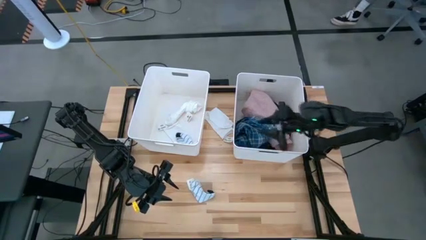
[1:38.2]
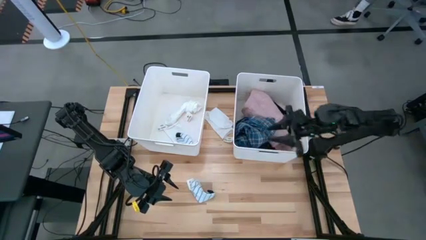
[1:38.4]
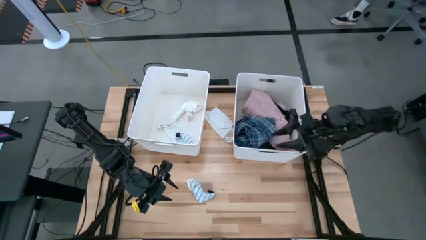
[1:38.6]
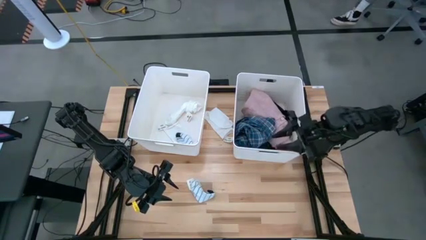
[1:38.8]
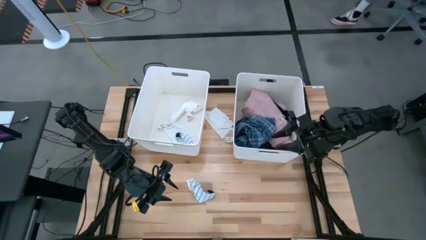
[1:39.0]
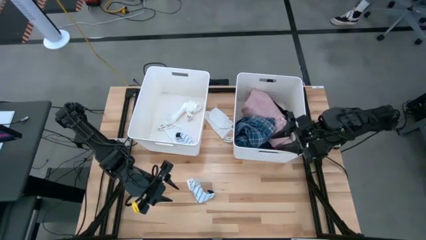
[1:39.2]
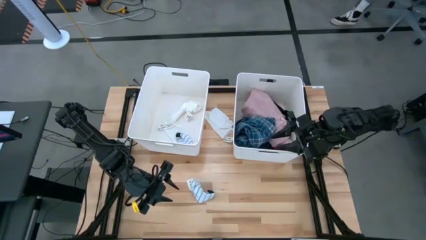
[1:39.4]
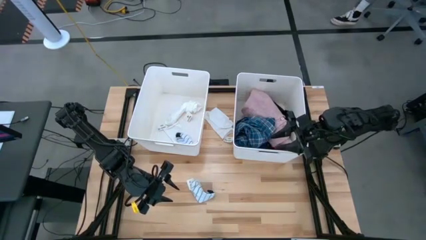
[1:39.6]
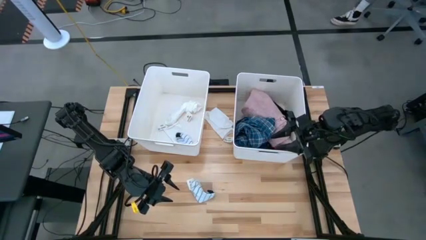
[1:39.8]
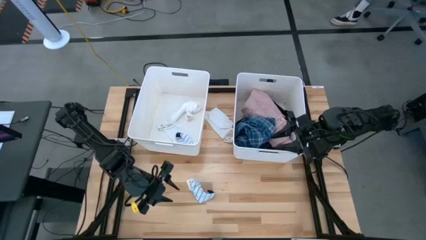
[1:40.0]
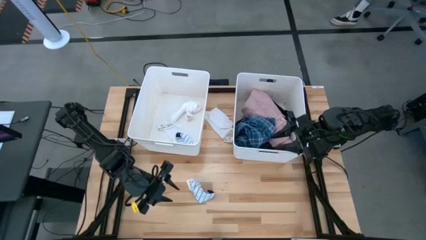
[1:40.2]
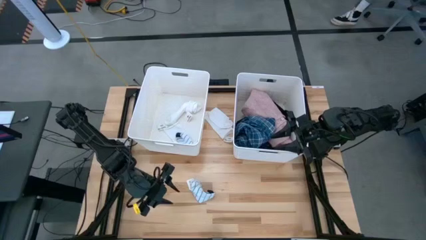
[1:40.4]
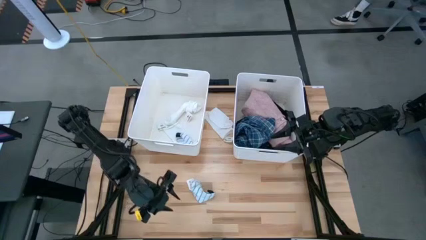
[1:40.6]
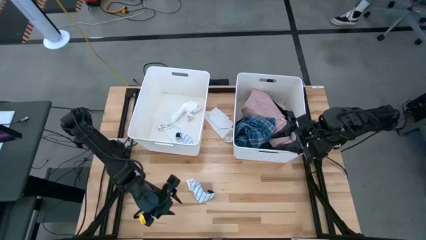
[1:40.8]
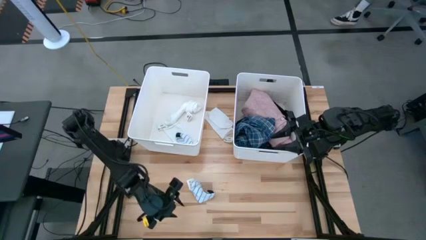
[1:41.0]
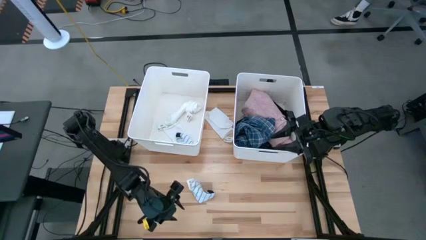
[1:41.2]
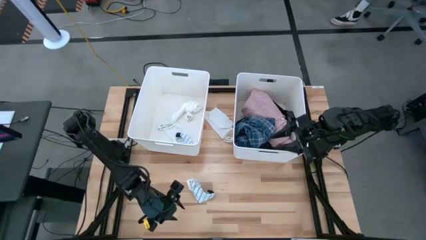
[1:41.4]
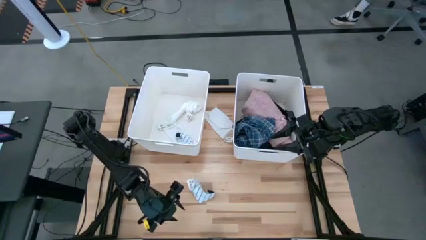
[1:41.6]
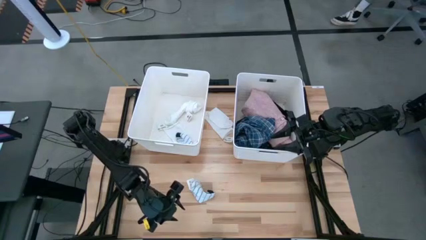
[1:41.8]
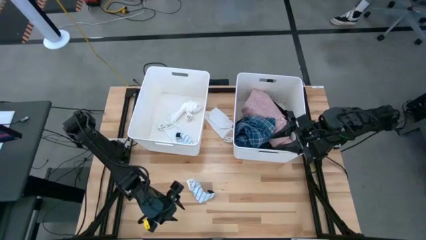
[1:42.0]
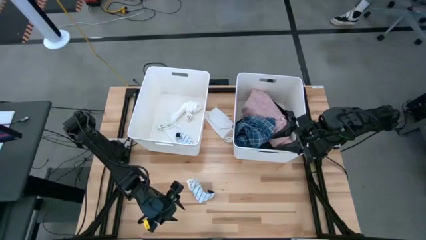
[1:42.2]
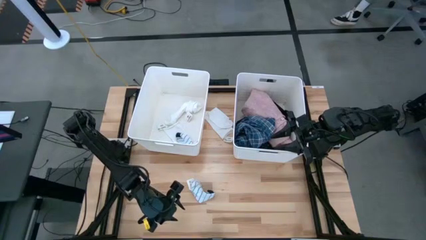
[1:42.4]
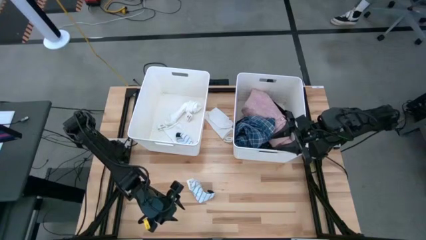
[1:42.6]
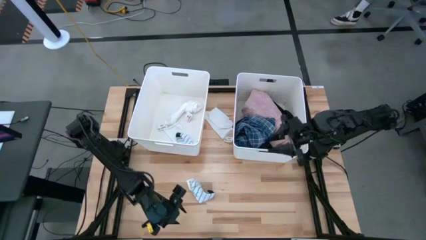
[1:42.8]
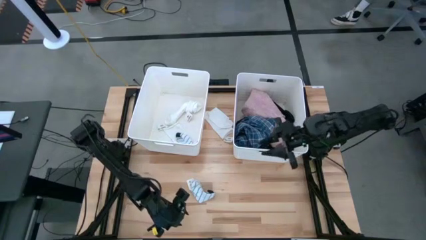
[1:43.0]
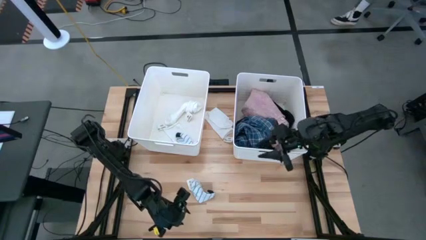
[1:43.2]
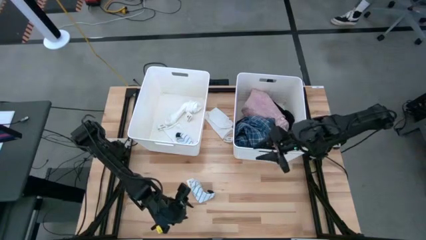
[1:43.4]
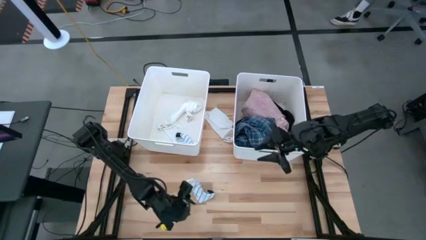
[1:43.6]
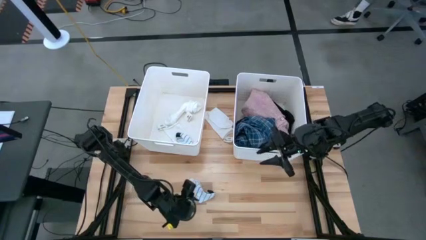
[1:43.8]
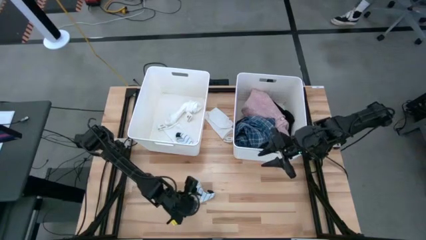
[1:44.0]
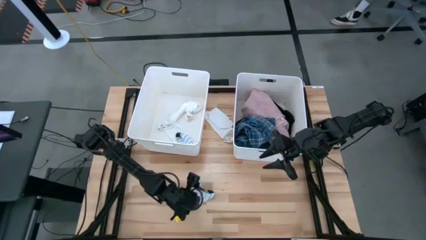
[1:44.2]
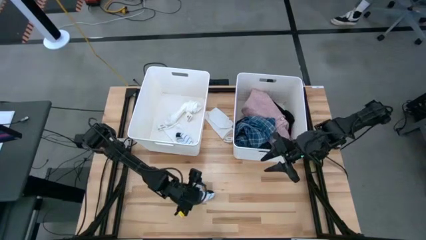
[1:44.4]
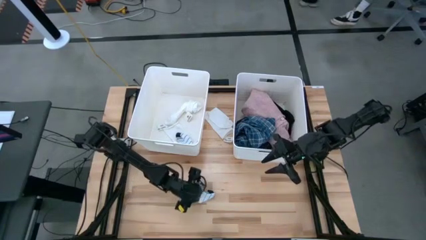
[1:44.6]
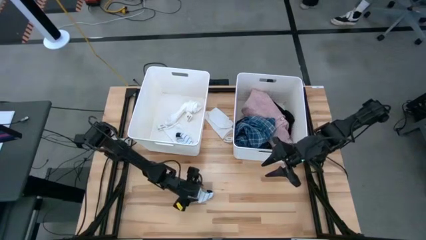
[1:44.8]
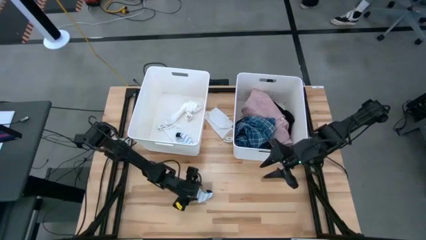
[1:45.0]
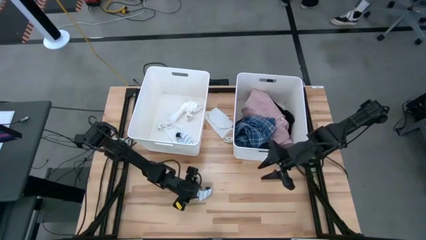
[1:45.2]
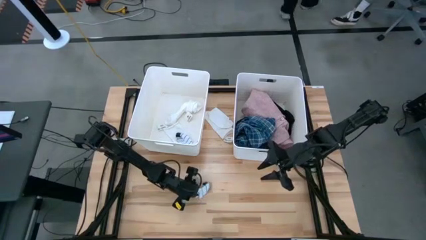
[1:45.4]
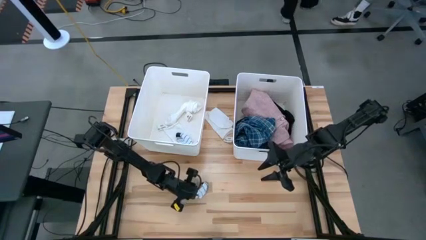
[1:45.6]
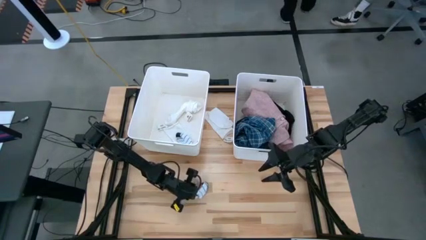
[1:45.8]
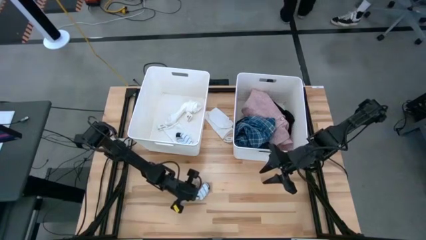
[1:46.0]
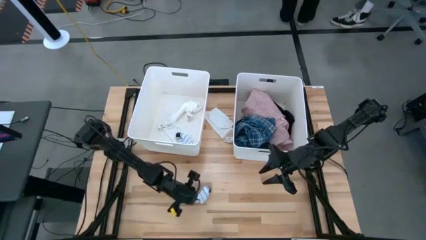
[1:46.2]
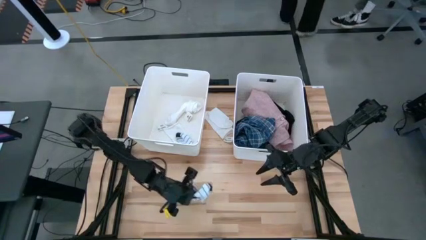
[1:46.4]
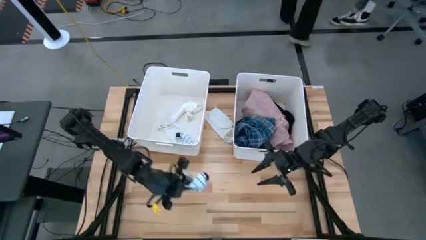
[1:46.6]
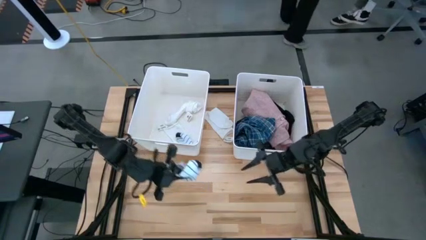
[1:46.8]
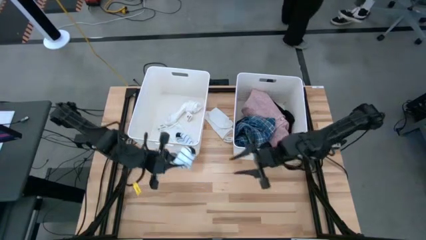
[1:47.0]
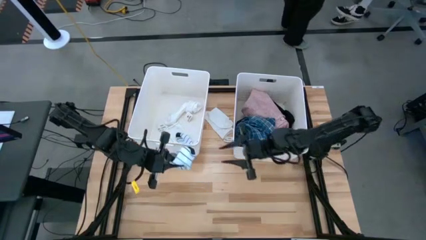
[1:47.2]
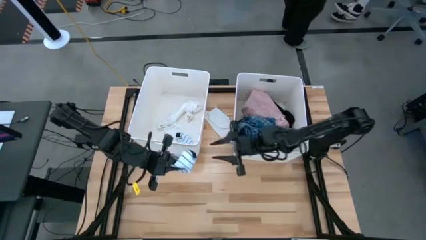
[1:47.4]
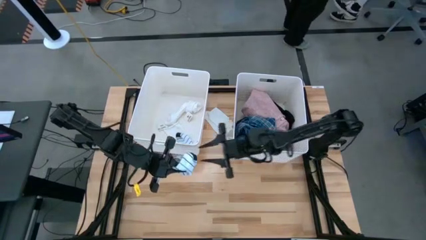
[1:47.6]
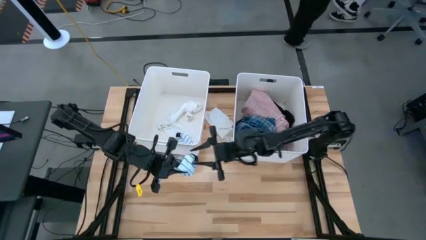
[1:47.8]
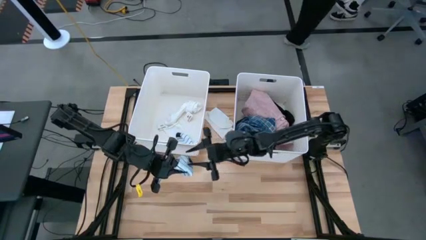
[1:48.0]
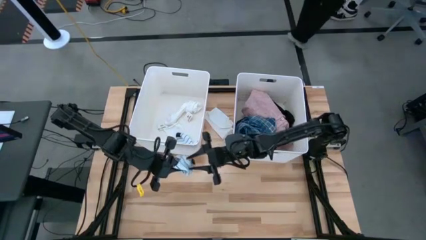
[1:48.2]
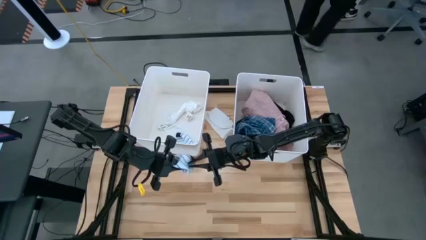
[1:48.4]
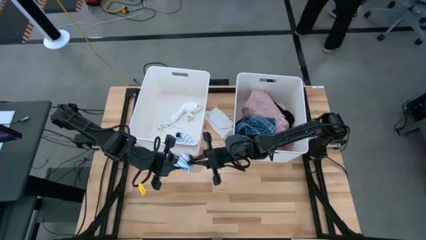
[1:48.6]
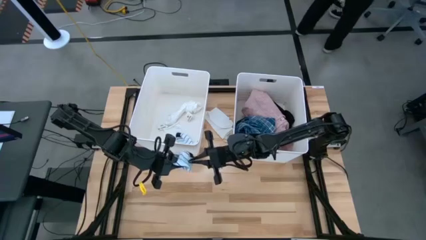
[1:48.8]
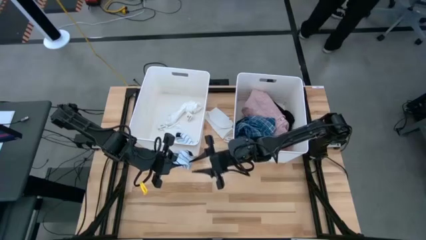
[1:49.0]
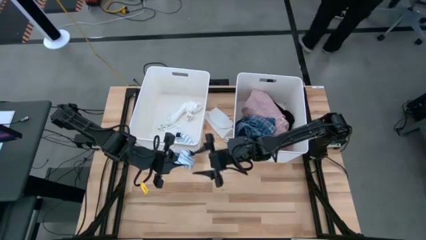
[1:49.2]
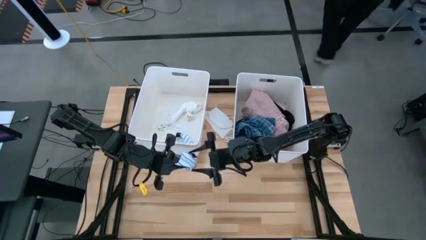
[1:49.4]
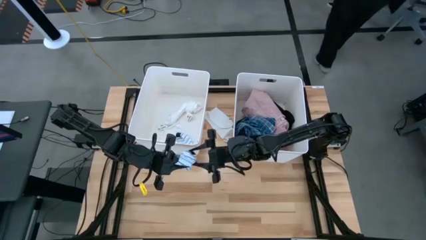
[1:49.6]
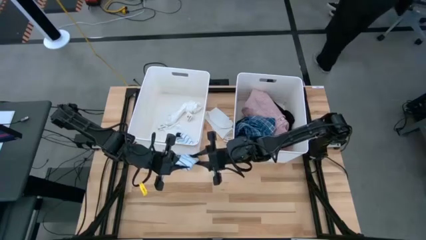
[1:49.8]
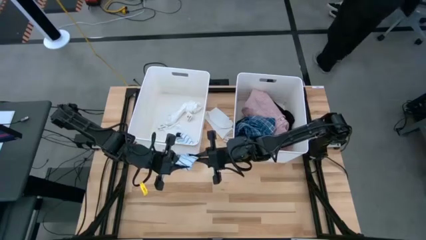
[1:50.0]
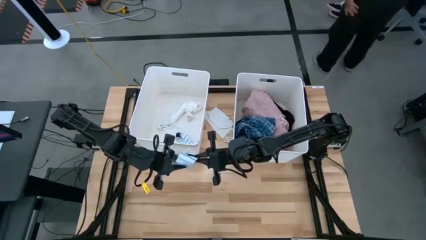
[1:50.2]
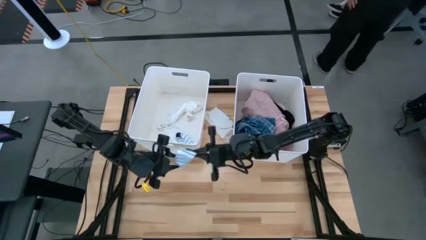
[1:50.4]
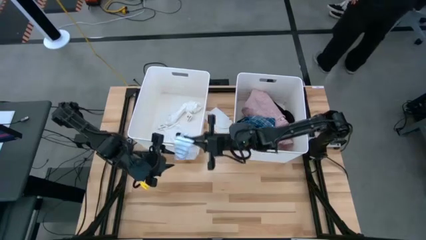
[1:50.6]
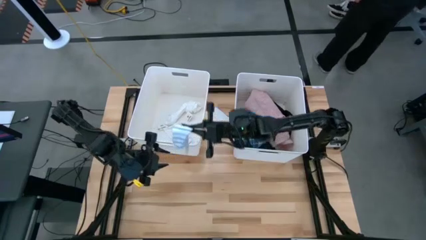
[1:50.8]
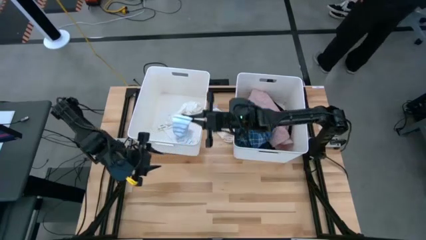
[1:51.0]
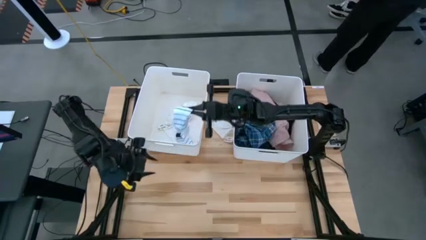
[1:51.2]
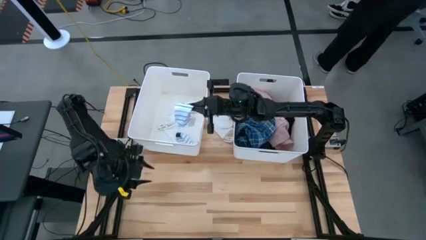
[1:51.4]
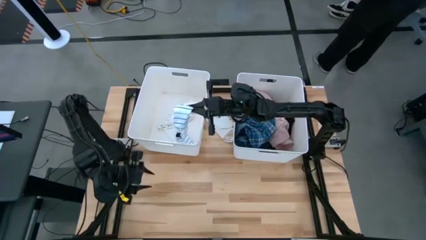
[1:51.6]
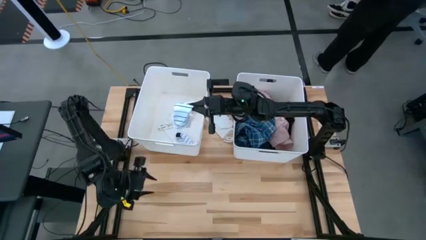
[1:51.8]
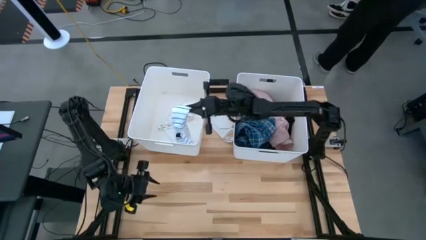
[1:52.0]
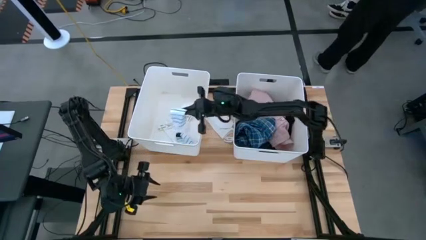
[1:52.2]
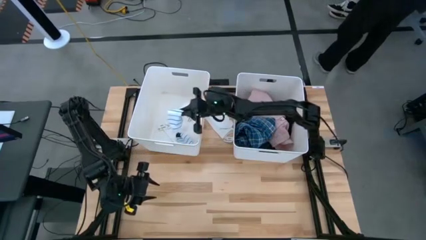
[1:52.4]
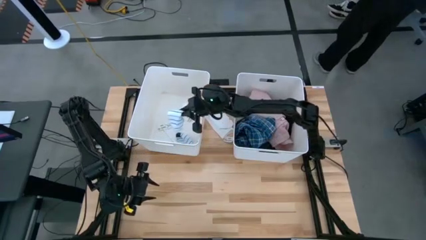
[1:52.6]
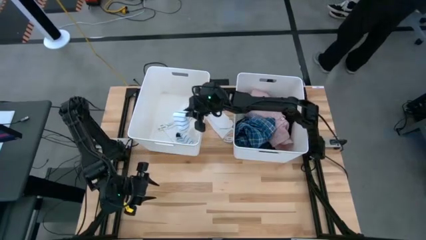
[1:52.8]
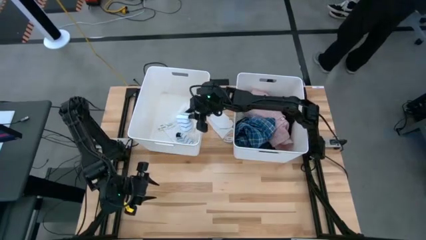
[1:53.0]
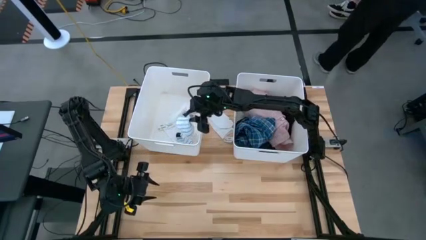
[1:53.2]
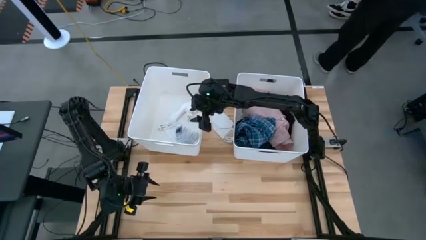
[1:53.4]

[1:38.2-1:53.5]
Task: Sort clothes
Put the blue striped sock into the left white laundry bin
